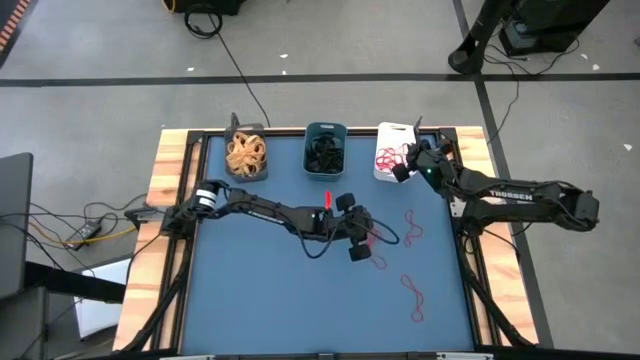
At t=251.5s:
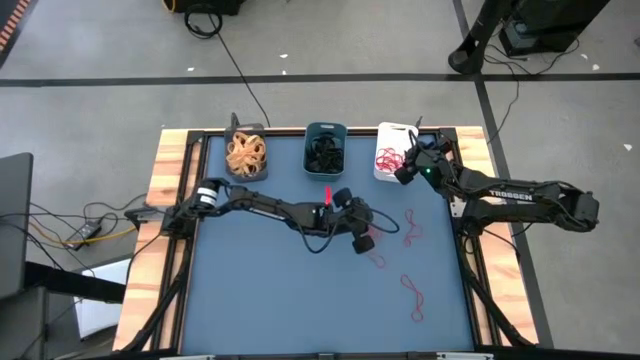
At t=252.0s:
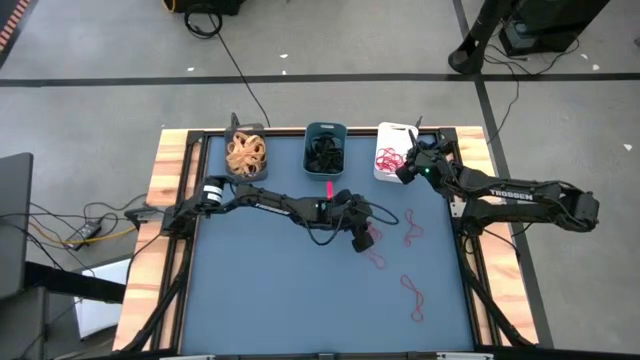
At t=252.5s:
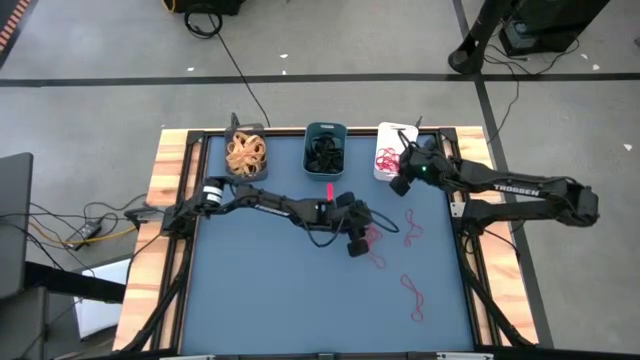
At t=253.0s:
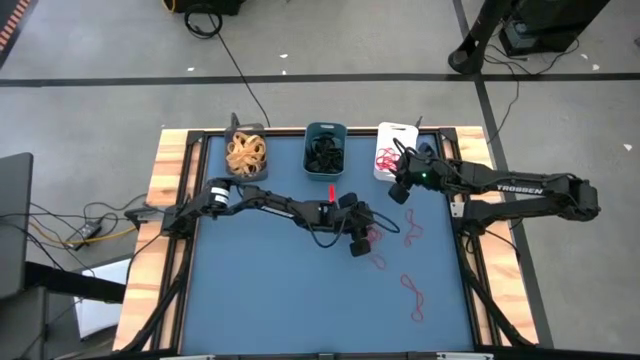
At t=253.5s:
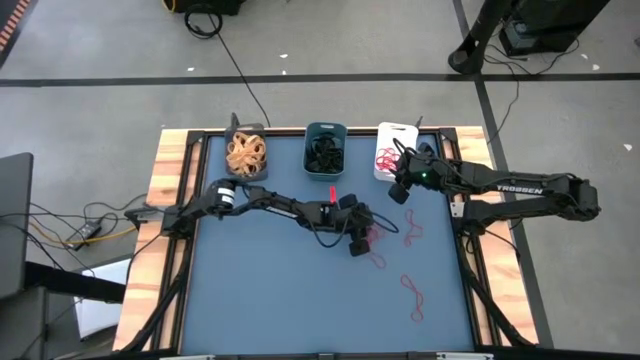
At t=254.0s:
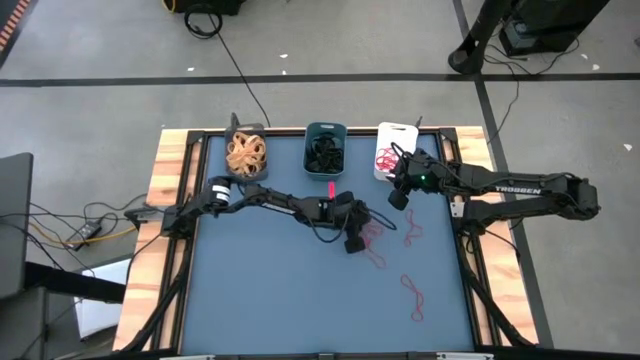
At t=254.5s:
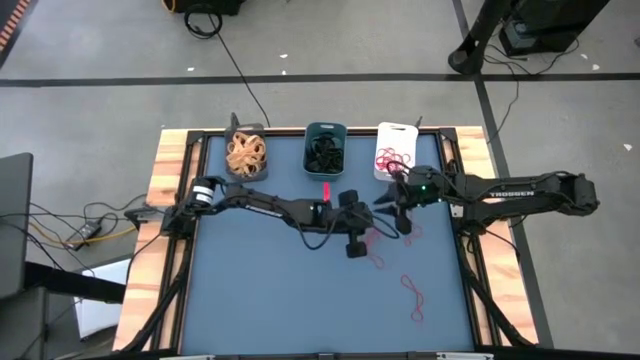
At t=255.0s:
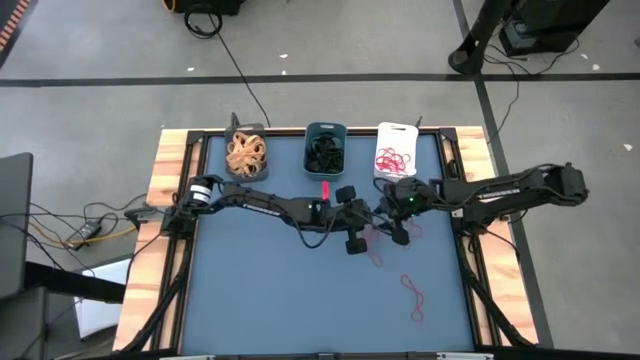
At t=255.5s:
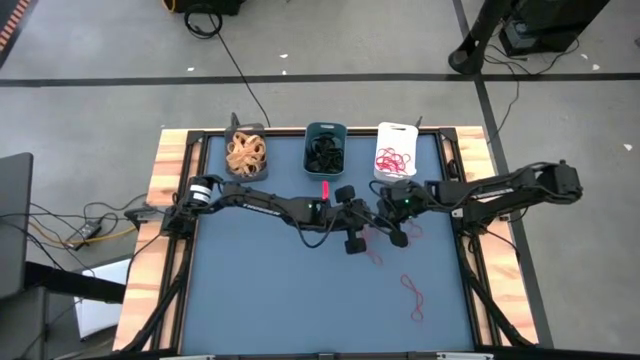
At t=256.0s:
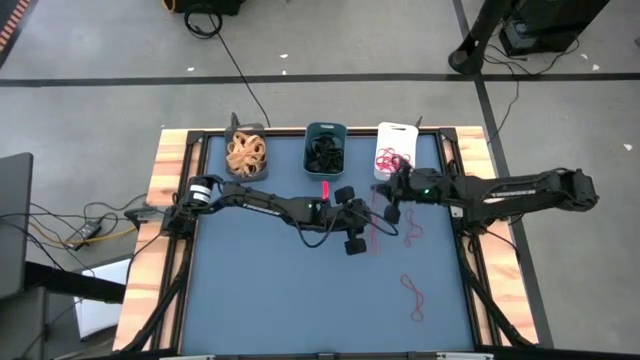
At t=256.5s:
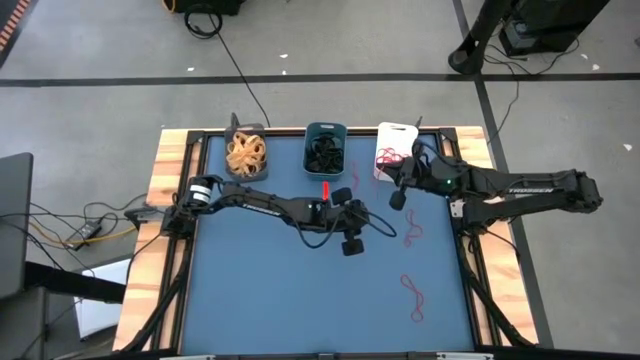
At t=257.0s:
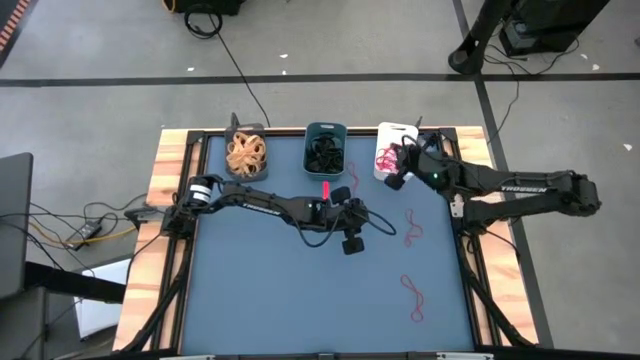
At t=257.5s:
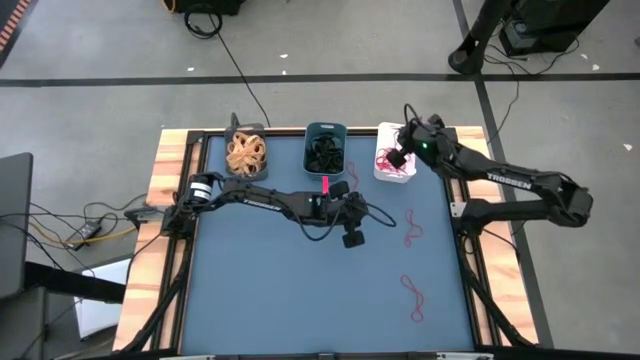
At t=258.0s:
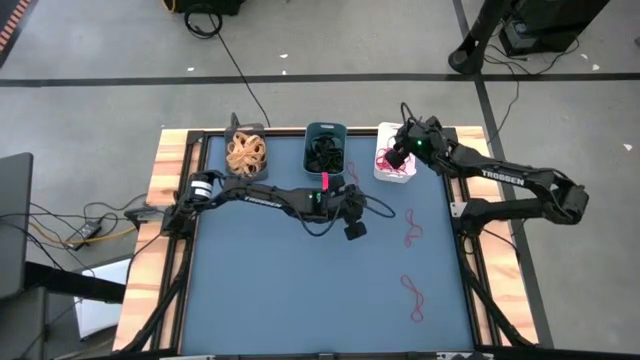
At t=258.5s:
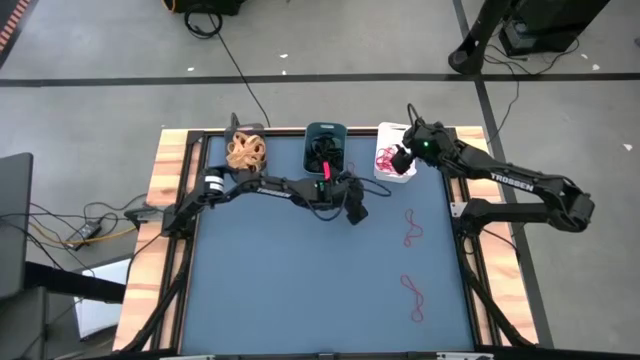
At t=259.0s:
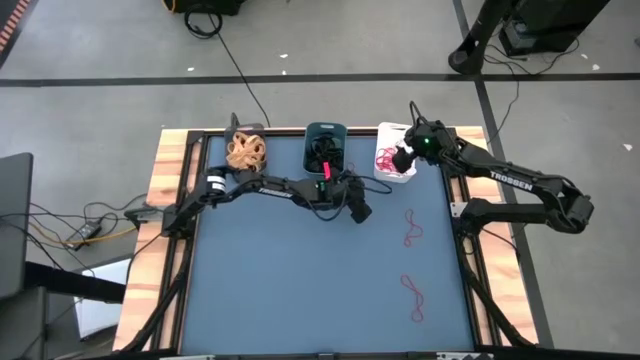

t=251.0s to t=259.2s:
Task: Sort rubber bands into baskets
Put the red rubber band into the white bin

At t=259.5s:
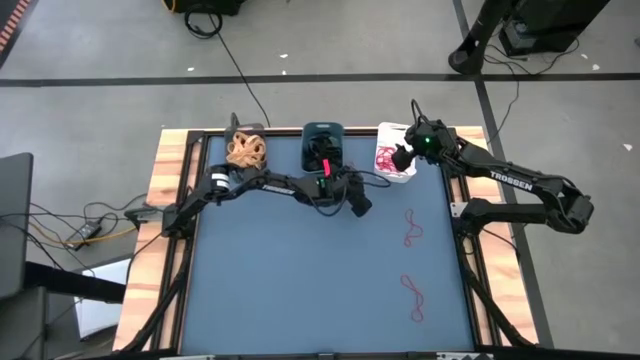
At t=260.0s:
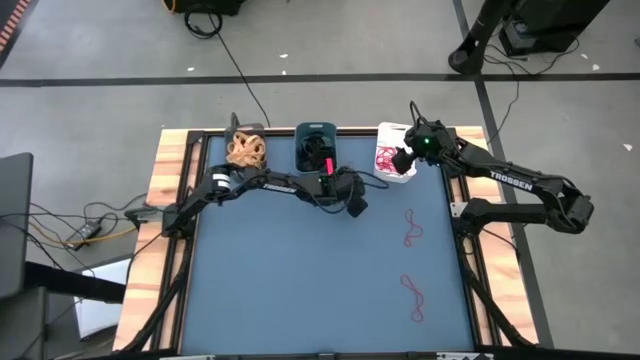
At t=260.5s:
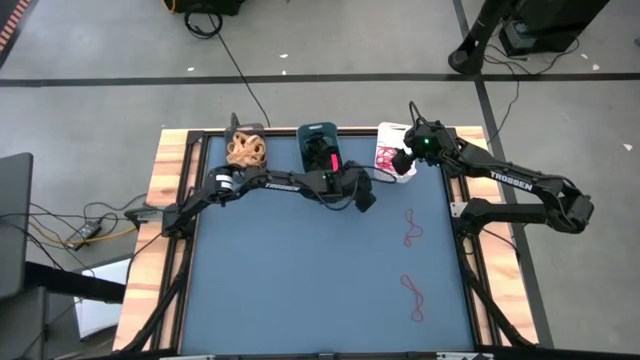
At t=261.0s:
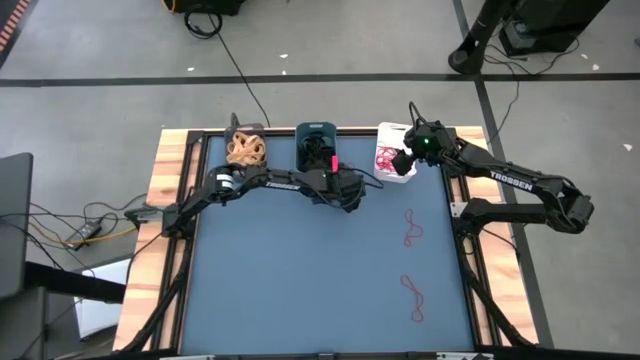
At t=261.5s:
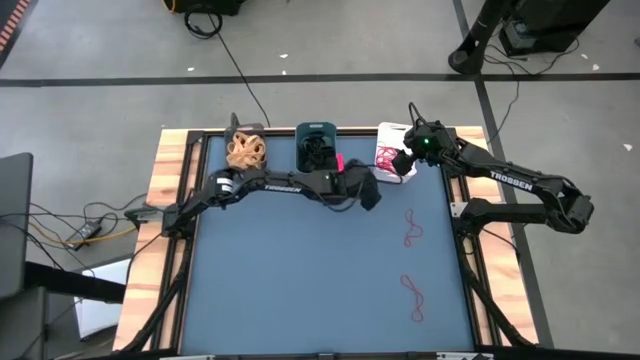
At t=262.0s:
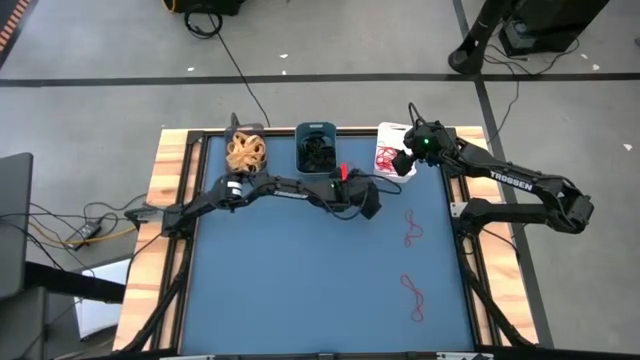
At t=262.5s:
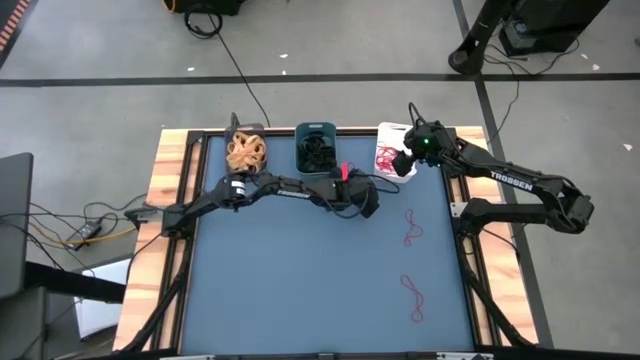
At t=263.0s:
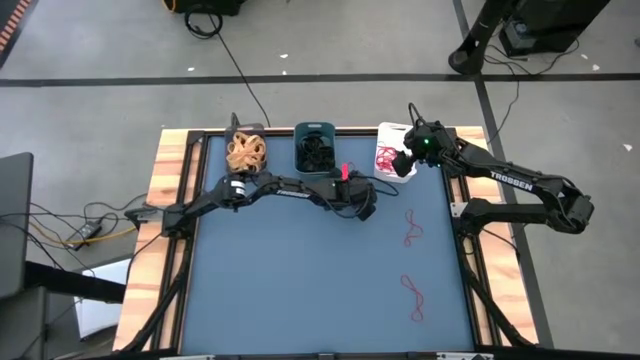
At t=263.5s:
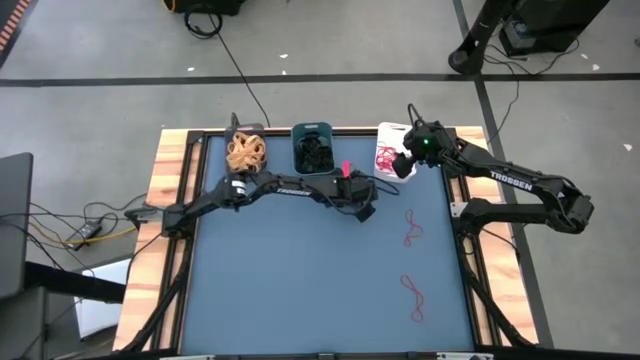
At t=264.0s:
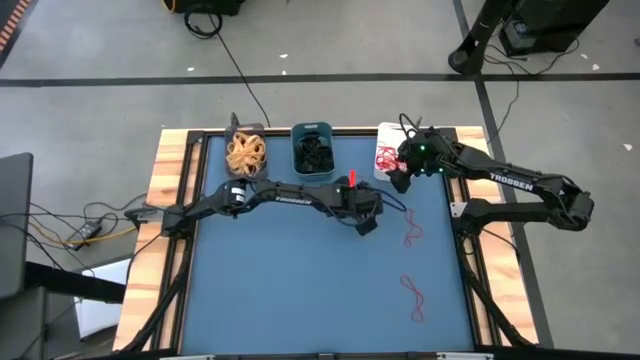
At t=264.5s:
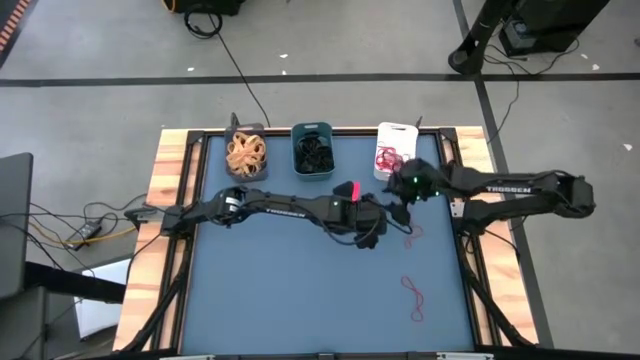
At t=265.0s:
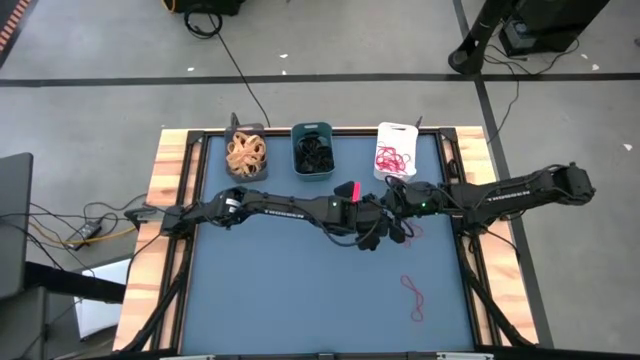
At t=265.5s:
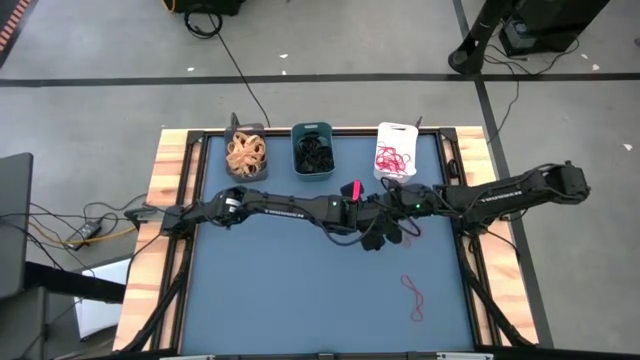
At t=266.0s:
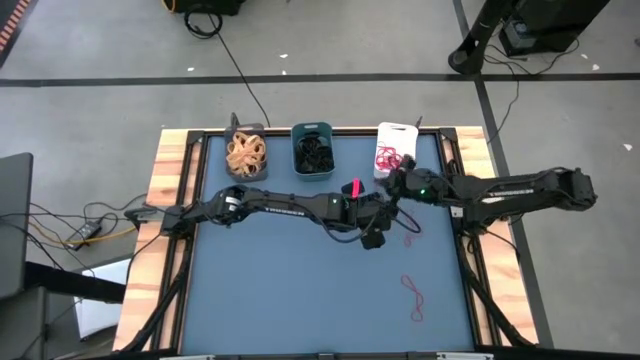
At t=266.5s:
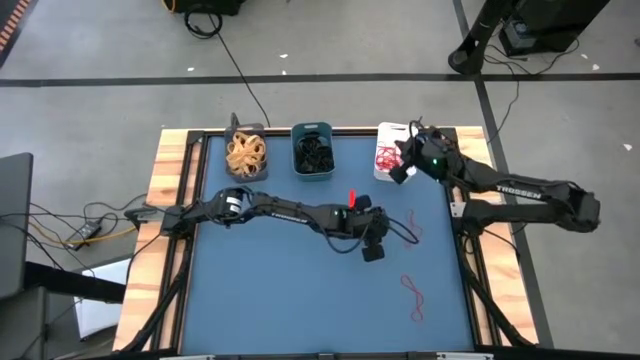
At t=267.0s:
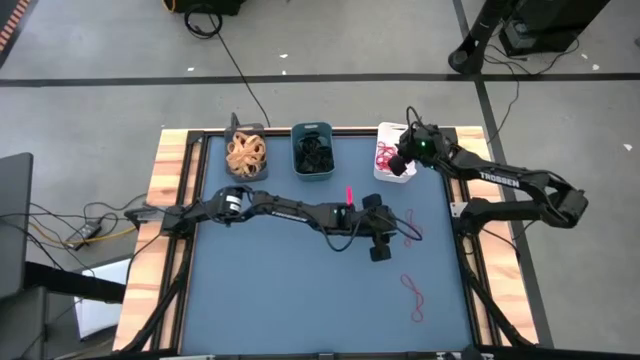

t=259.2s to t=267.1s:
Put the red rubber band into the white bin

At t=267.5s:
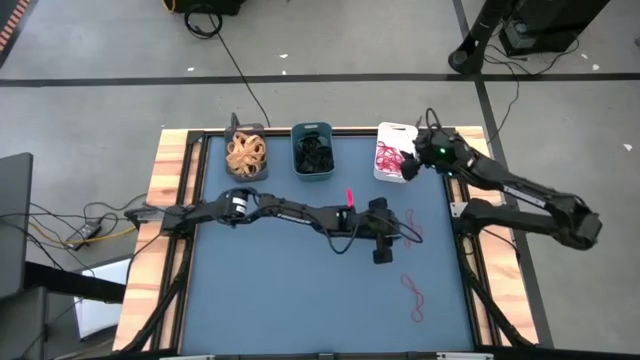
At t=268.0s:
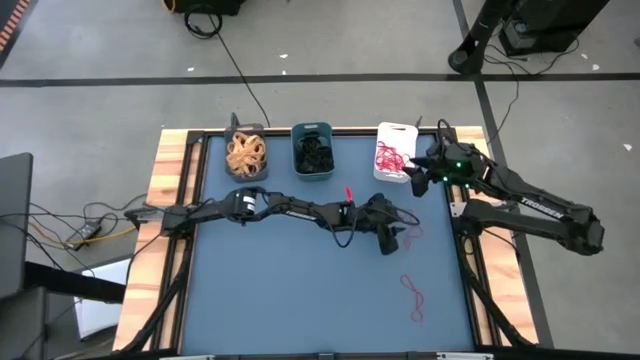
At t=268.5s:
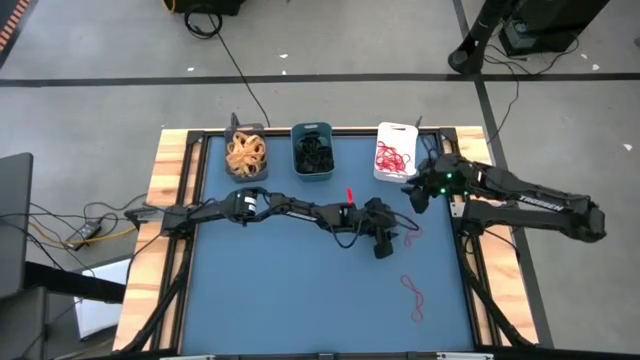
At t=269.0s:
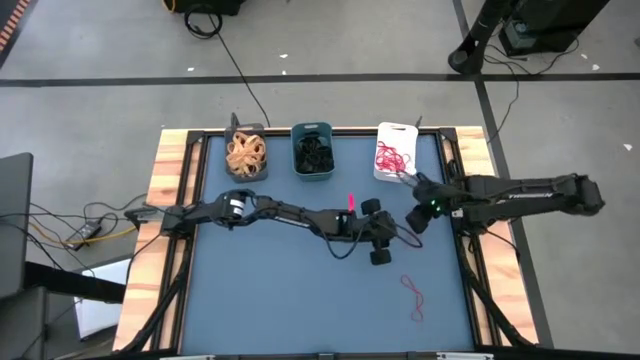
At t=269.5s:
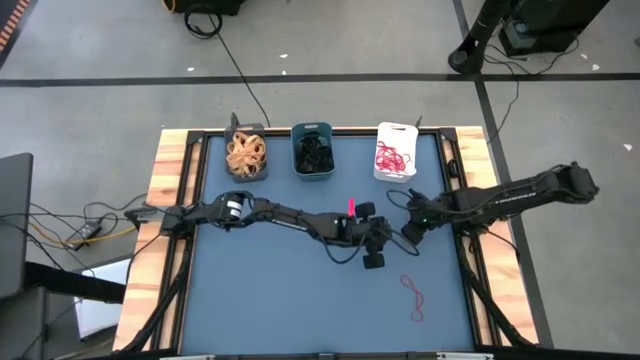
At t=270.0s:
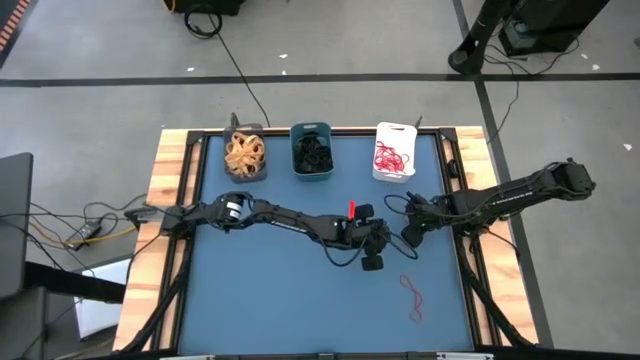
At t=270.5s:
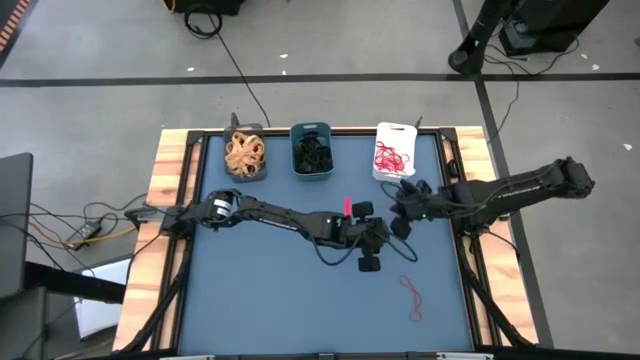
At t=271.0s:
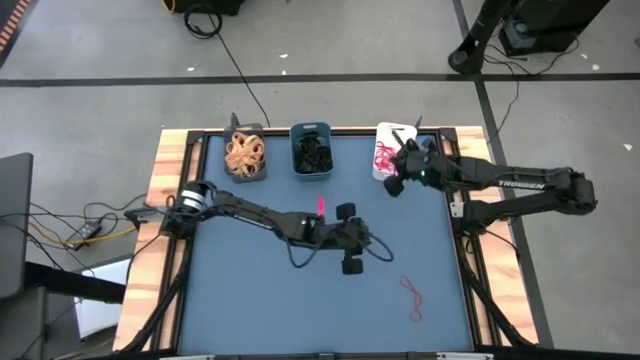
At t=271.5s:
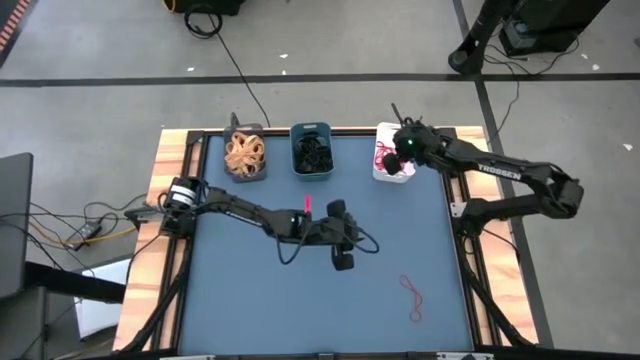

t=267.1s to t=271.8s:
Put the red rubber band into the white bin
